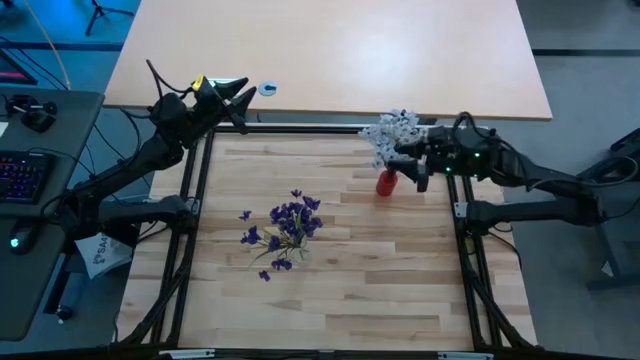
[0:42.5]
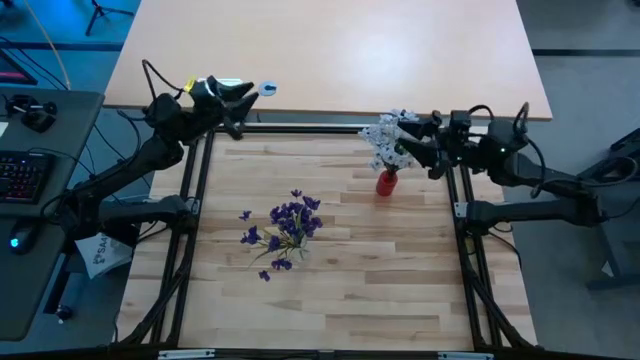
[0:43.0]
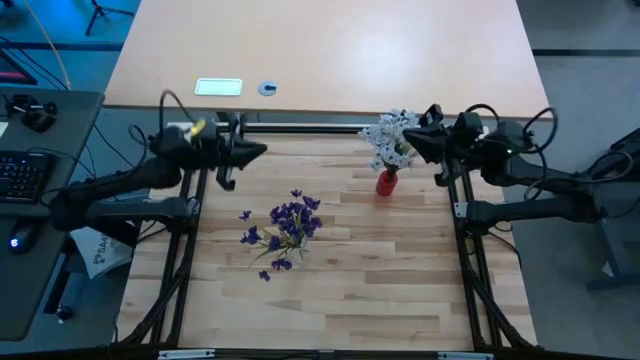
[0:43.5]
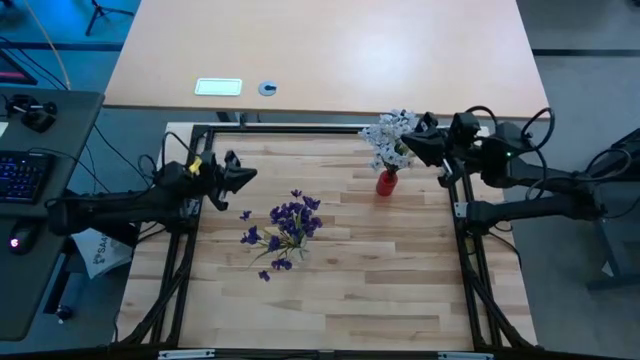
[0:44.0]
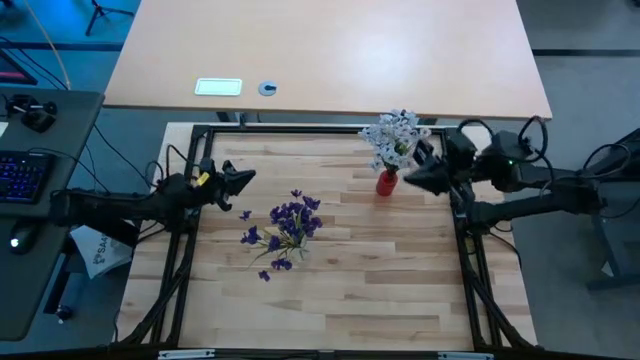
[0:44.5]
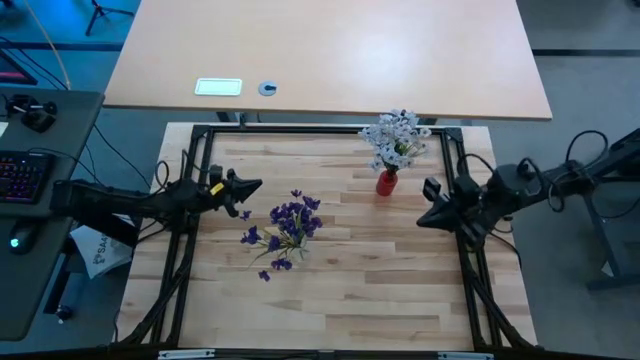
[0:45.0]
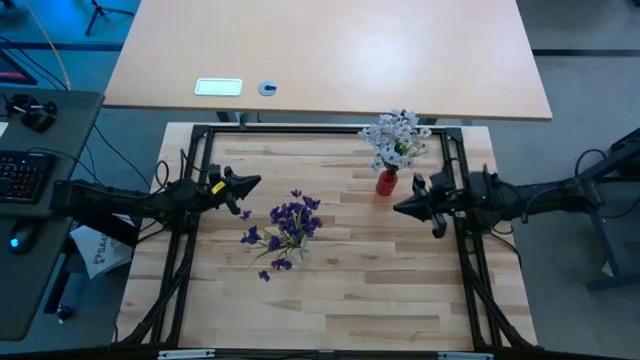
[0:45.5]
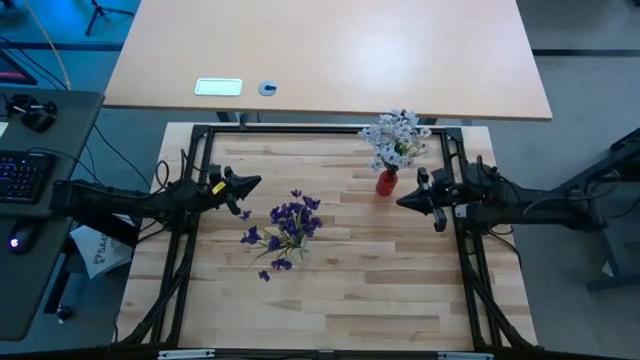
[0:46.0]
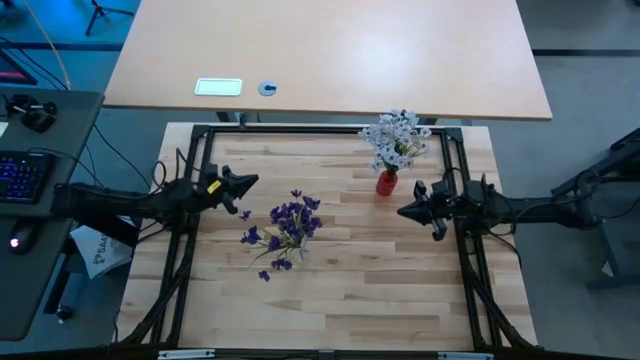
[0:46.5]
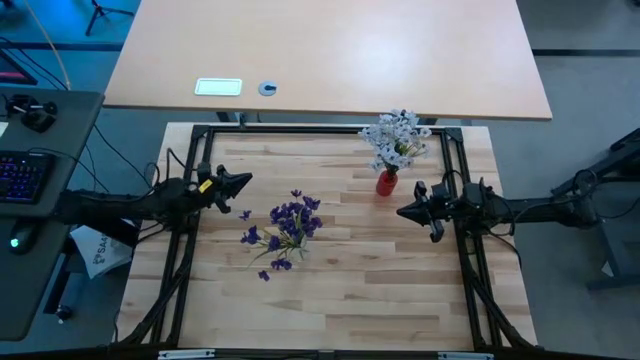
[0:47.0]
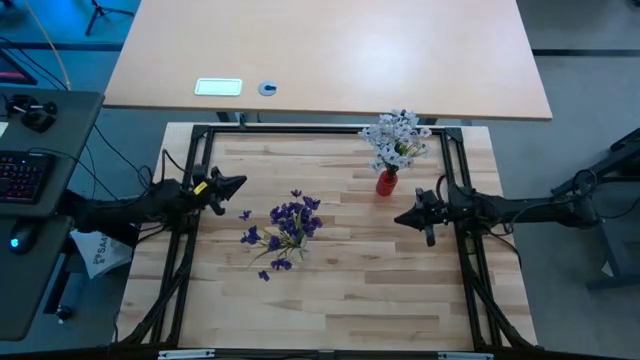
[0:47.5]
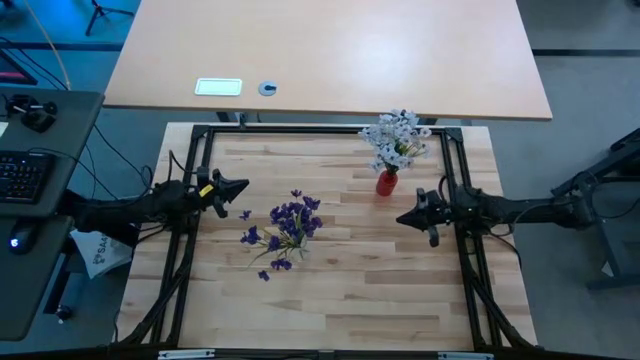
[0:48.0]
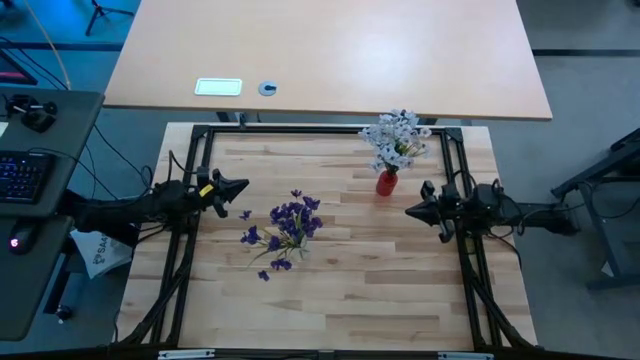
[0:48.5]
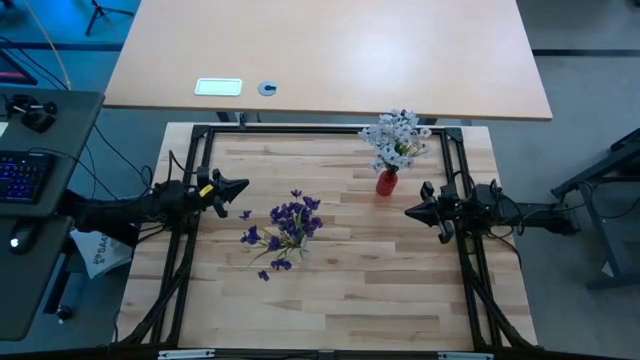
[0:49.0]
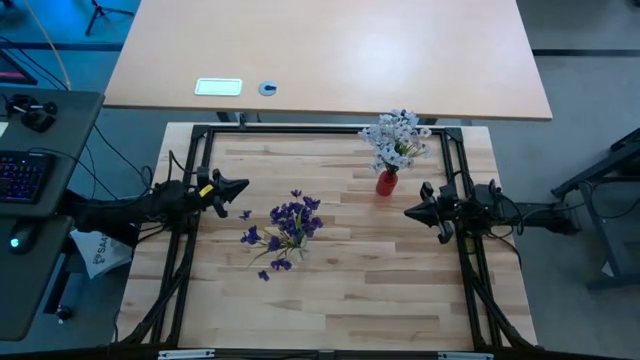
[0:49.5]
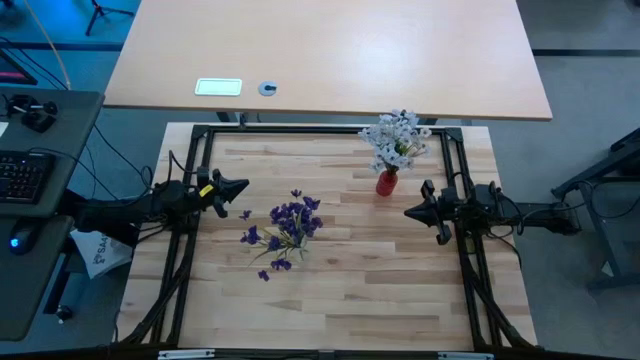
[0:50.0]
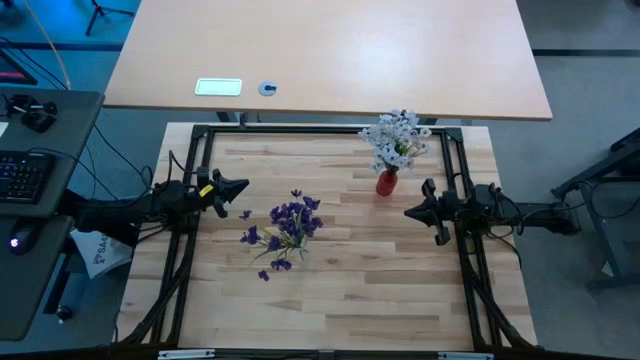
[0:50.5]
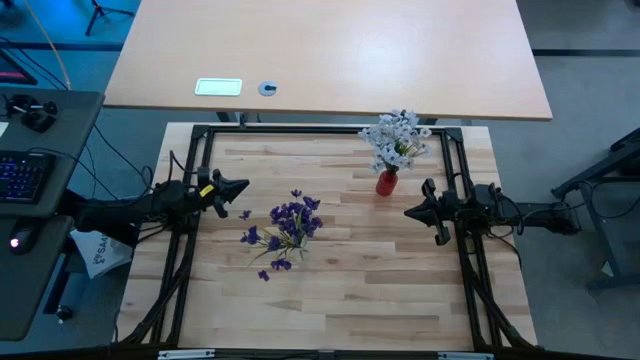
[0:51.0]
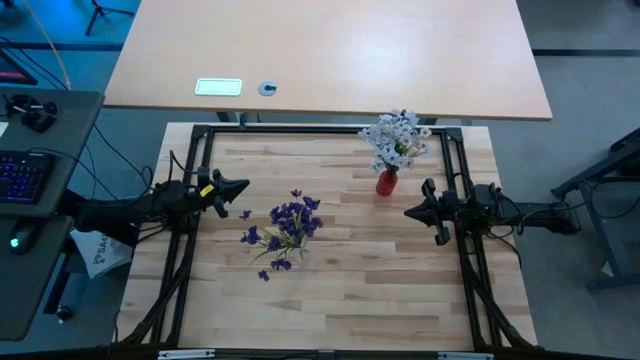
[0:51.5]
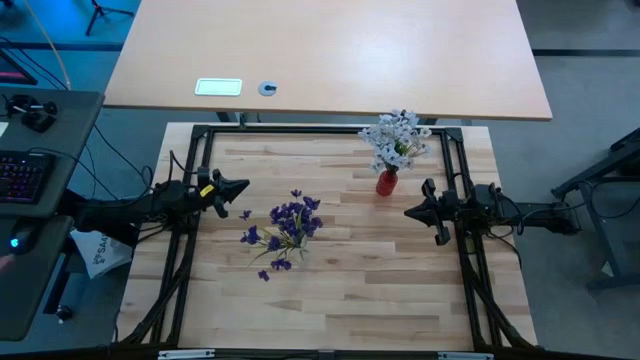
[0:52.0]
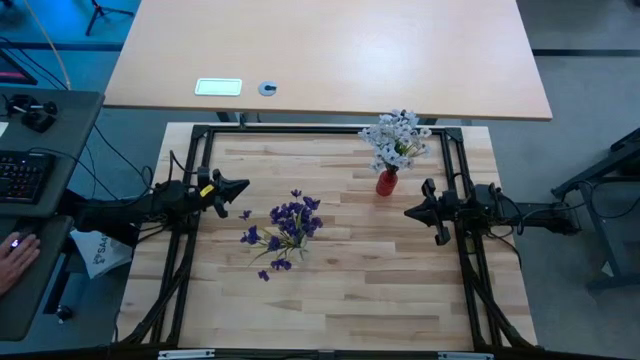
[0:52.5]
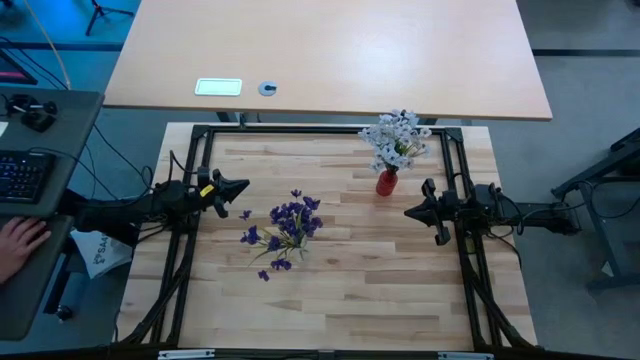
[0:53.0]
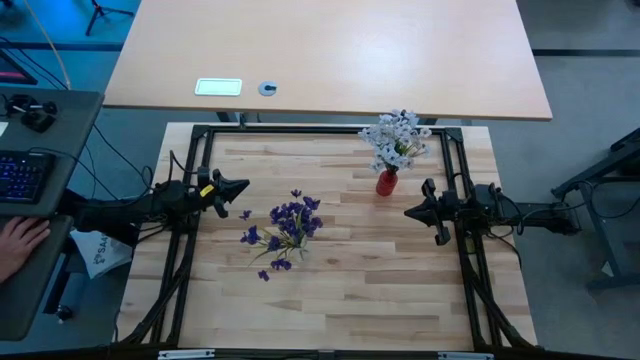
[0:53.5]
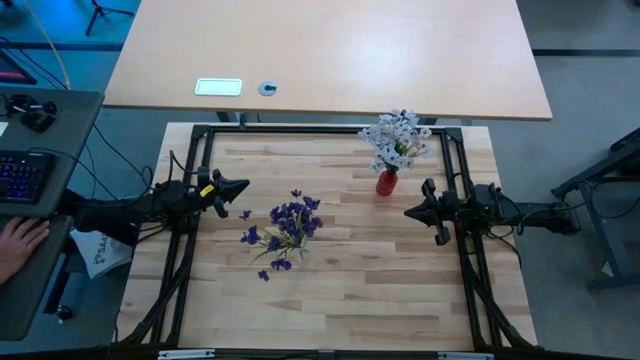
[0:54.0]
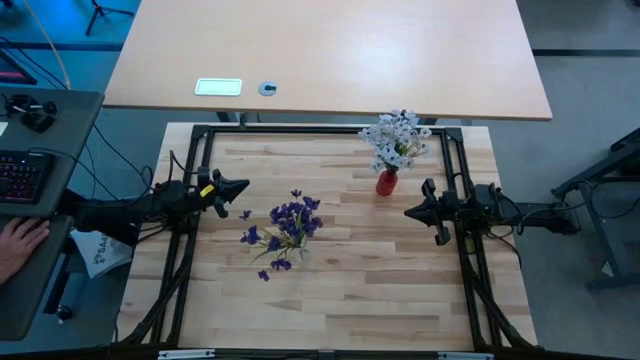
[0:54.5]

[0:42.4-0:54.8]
Task: Sort flowers into vase by color
Return to Home Position

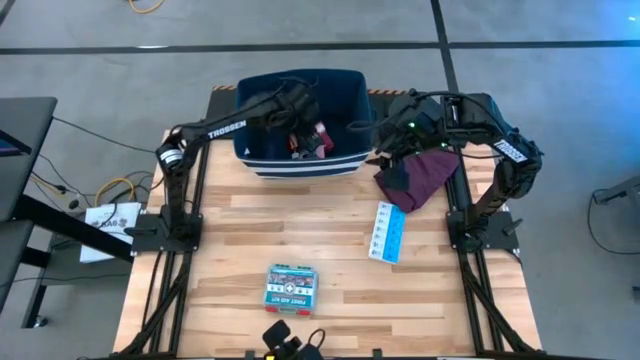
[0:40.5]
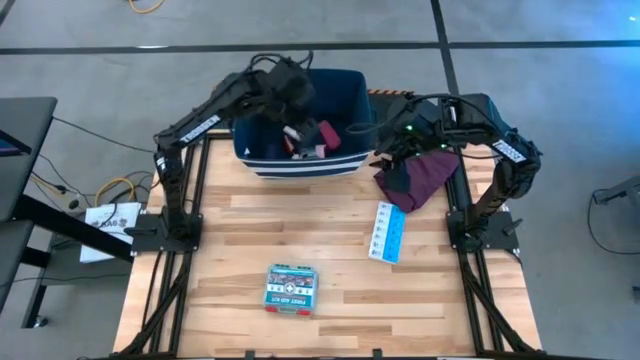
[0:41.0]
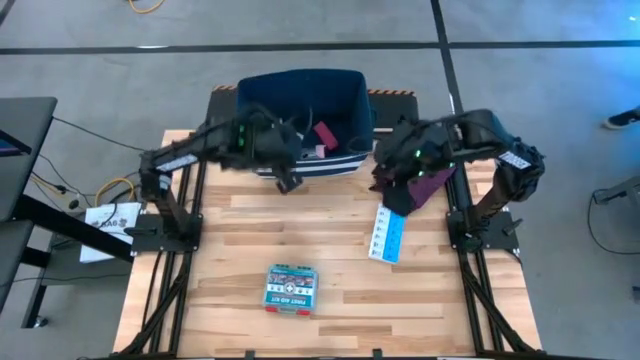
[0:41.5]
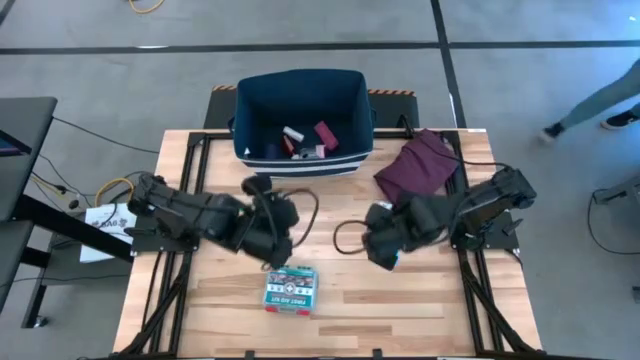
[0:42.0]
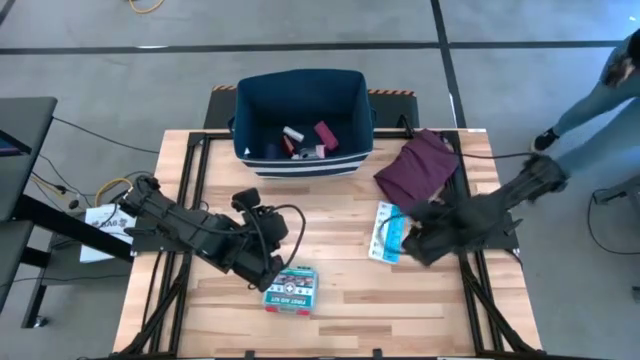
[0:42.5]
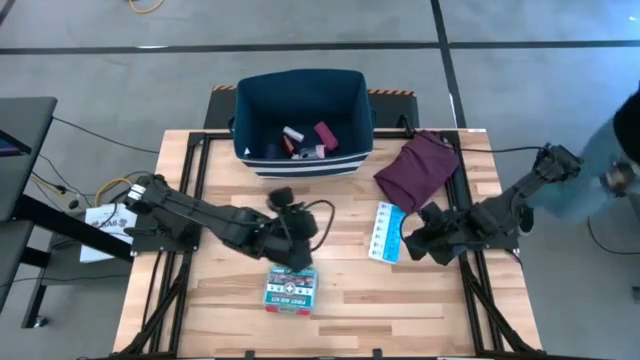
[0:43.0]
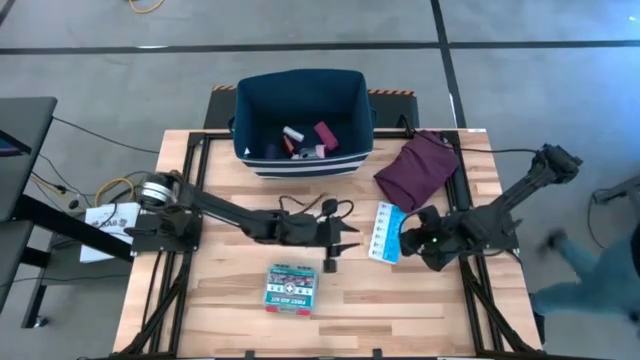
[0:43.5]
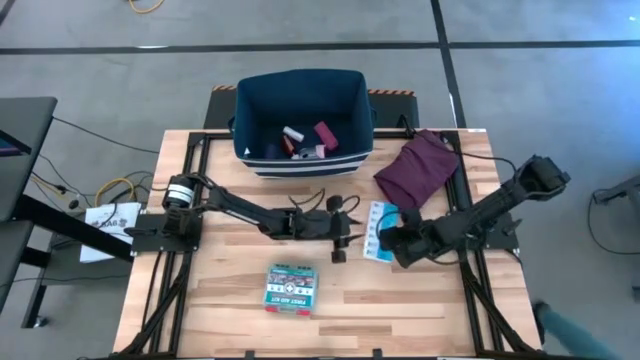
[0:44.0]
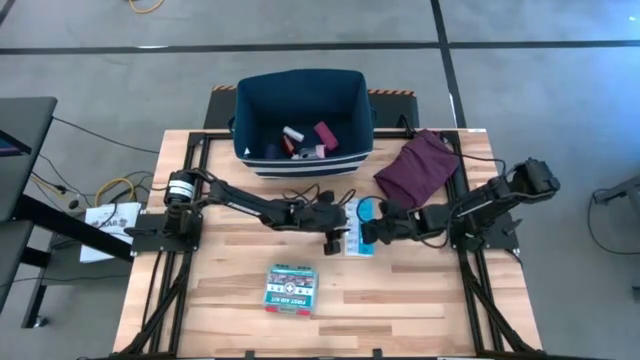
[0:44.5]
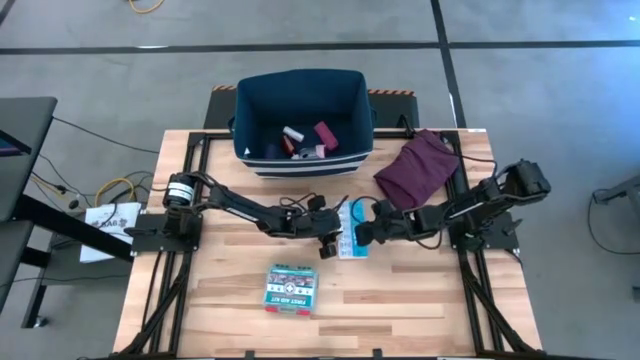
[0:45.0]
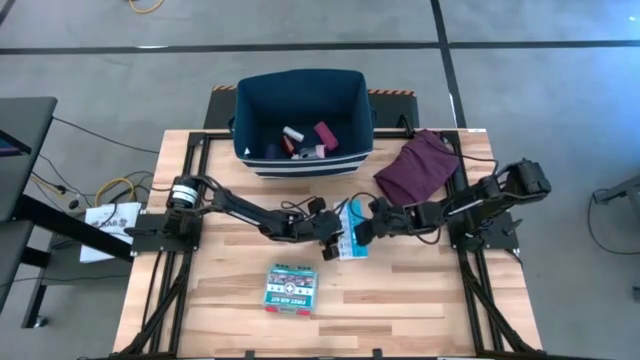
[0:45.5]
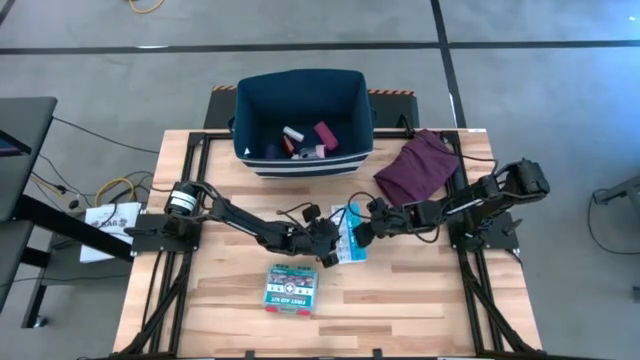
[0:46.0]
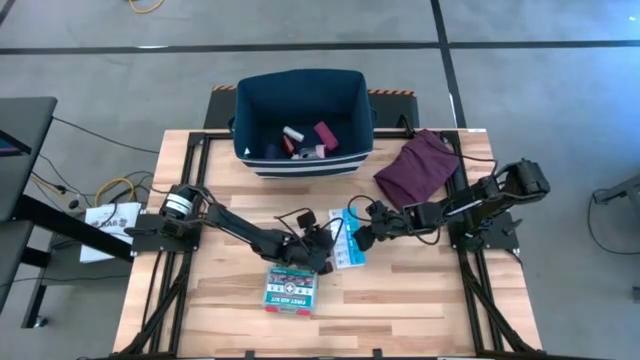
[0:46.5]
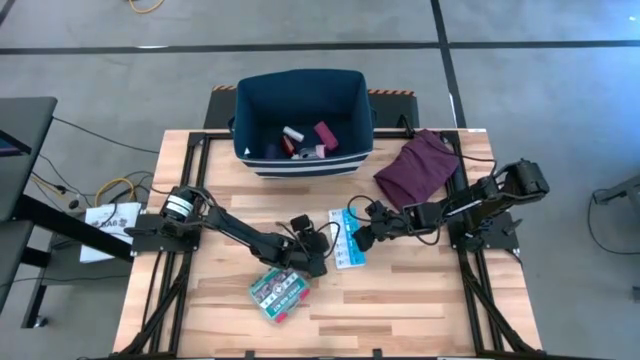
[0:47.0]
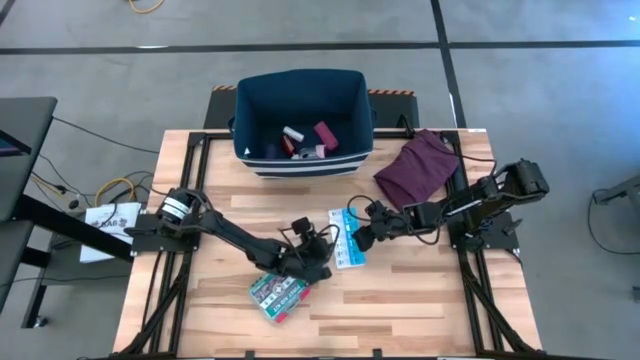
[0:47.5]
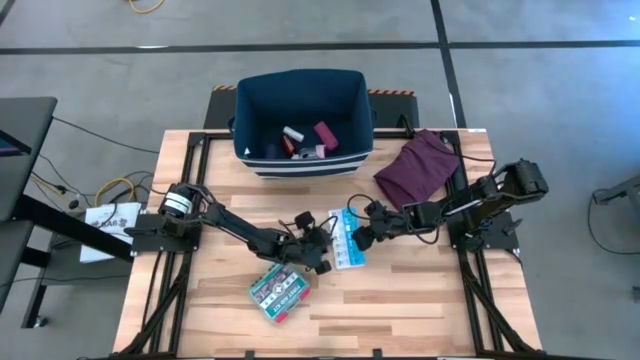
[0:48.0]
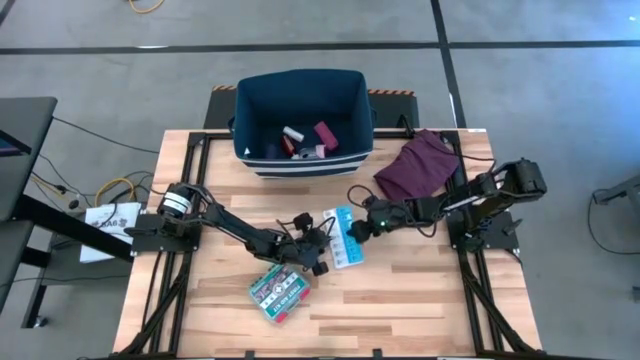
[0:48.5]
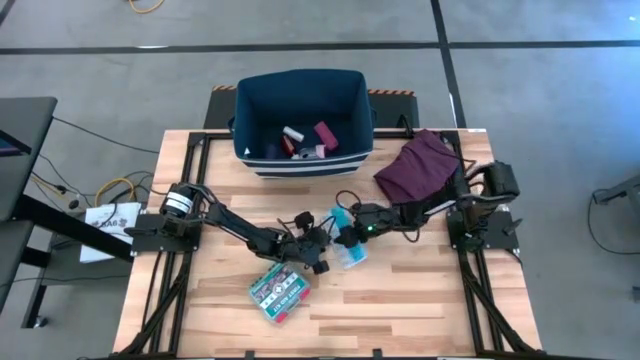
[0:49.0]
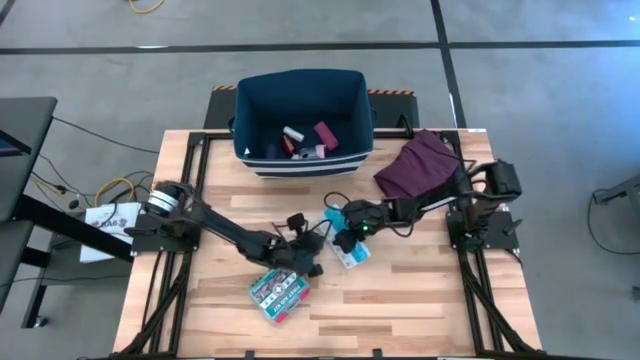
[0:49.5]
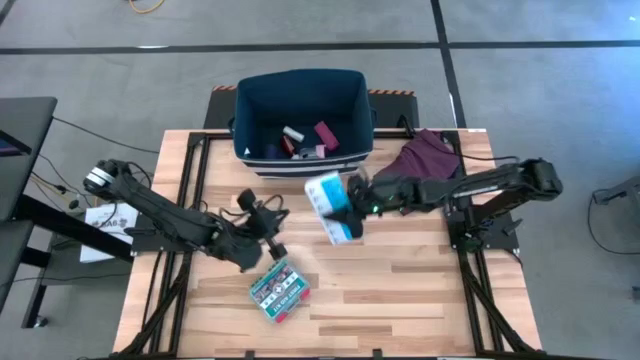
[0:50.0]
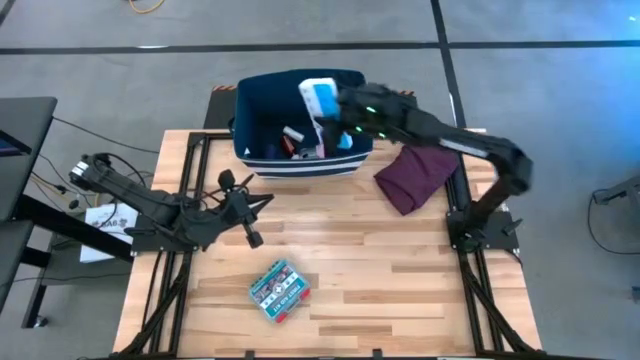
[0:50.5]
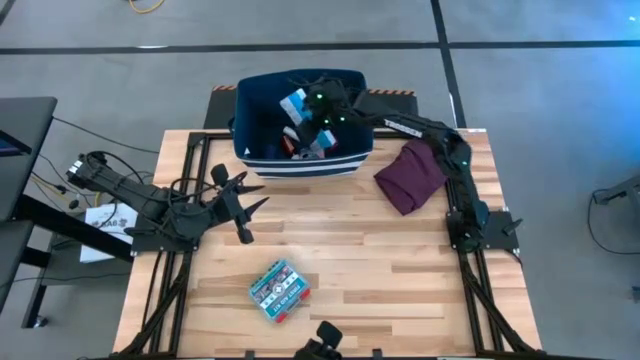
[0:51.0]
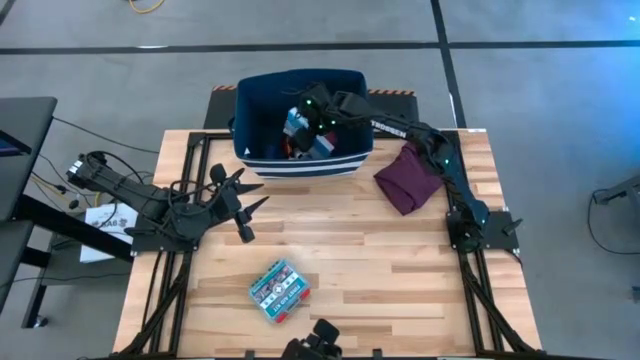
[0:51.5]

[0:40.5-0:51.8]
Task: Pick & place medical supplies in basket/bin
Put the medicine organizer into the blue bin
